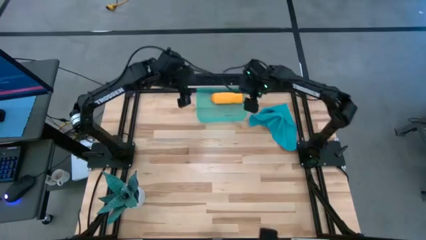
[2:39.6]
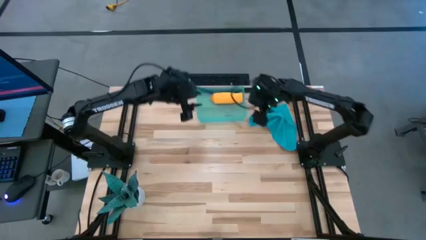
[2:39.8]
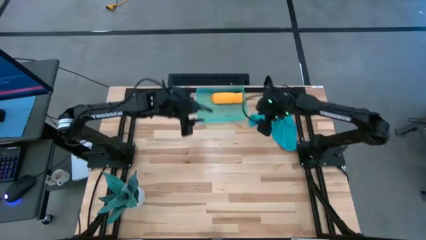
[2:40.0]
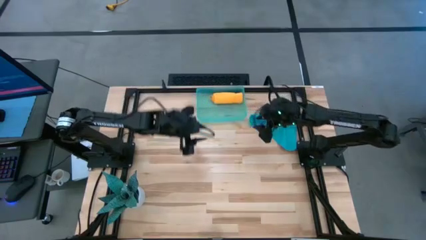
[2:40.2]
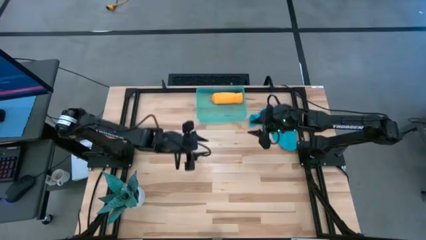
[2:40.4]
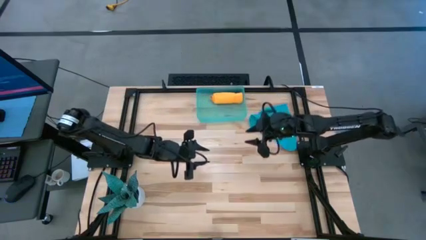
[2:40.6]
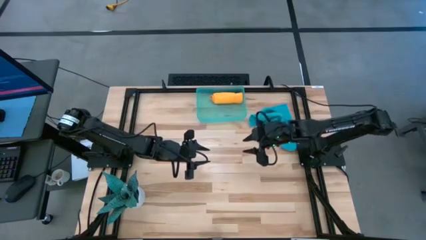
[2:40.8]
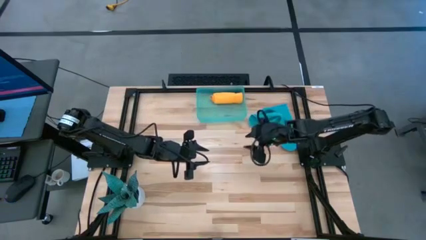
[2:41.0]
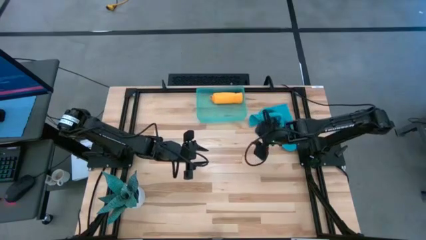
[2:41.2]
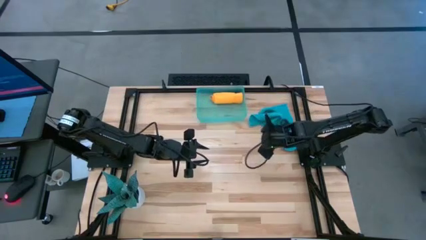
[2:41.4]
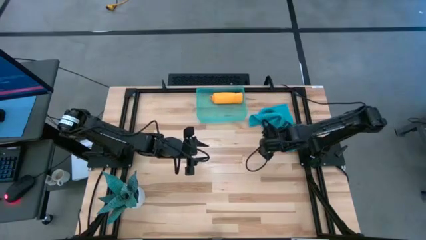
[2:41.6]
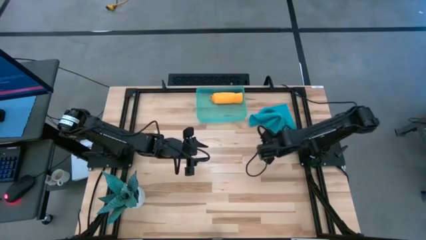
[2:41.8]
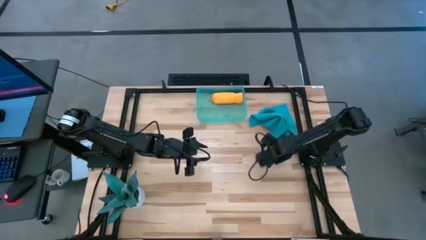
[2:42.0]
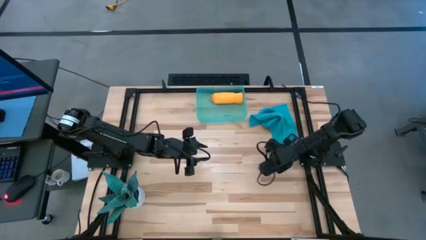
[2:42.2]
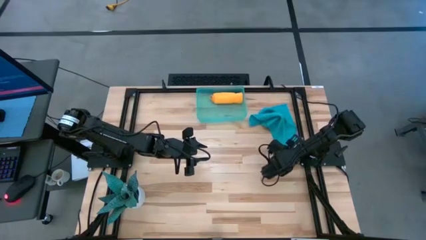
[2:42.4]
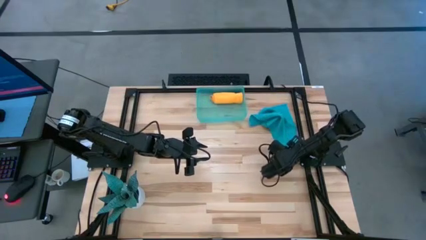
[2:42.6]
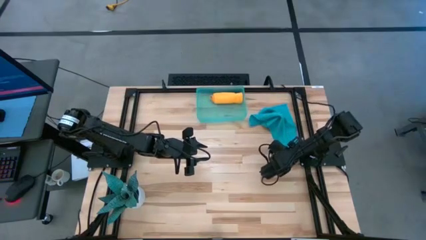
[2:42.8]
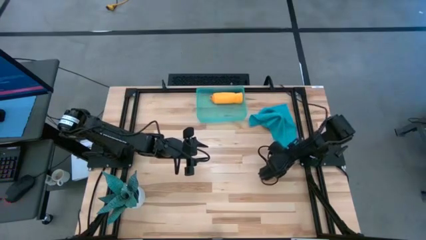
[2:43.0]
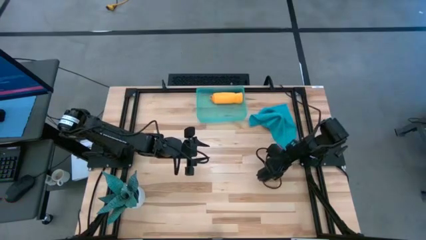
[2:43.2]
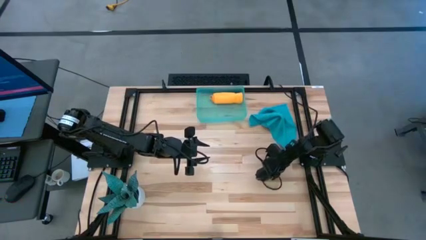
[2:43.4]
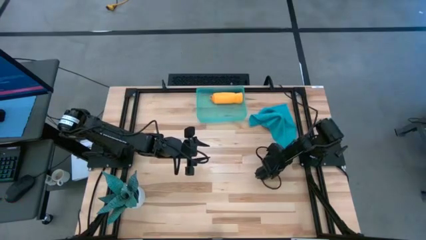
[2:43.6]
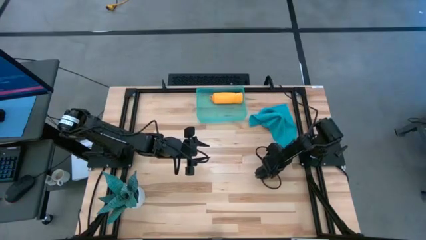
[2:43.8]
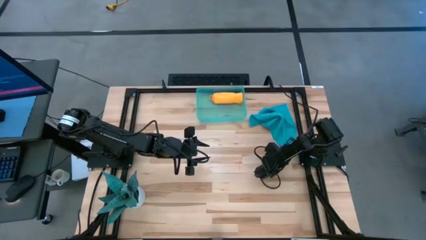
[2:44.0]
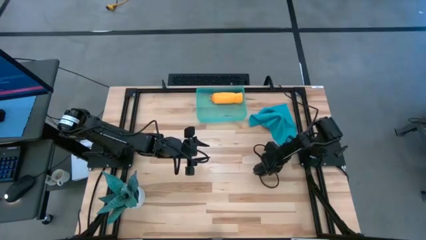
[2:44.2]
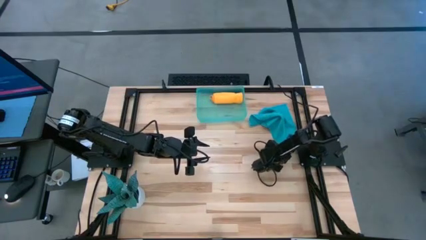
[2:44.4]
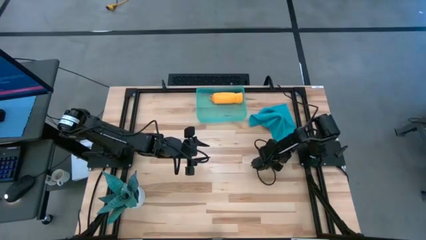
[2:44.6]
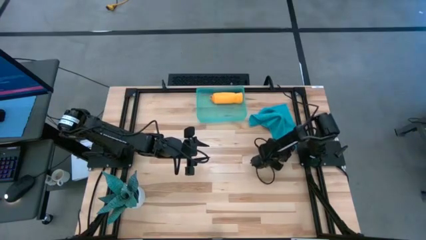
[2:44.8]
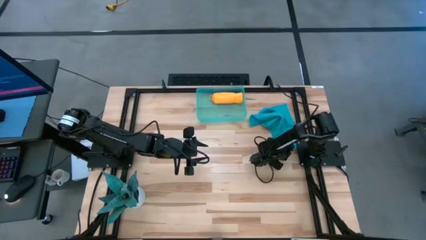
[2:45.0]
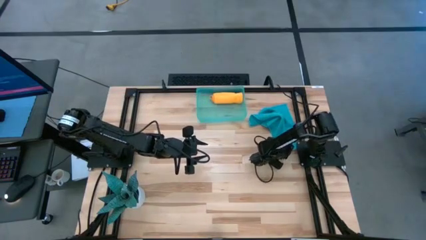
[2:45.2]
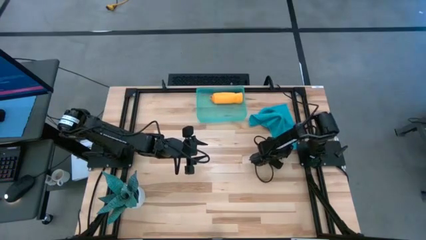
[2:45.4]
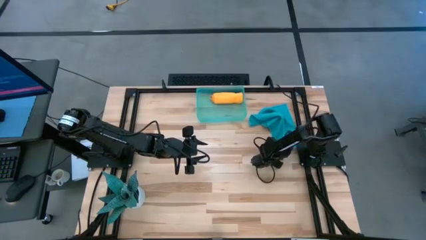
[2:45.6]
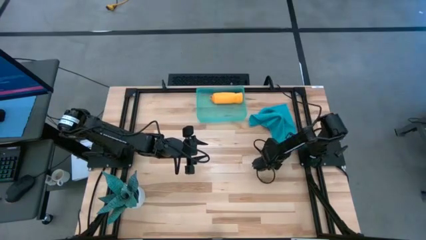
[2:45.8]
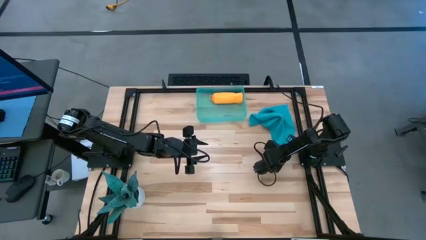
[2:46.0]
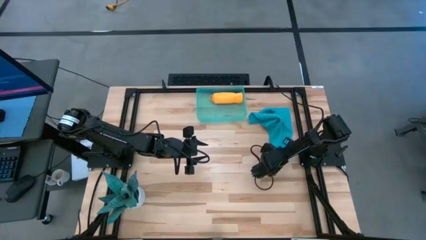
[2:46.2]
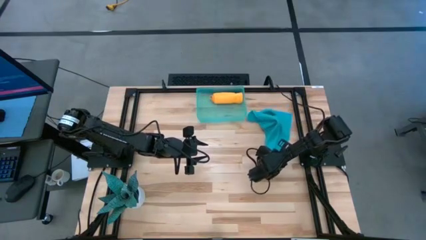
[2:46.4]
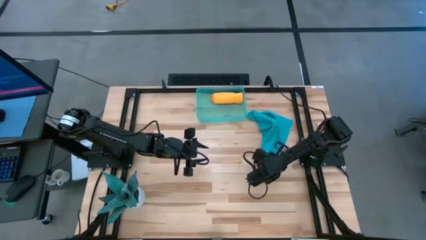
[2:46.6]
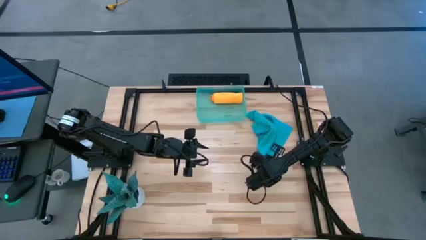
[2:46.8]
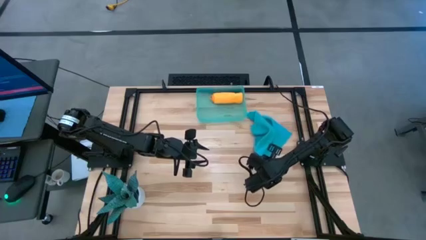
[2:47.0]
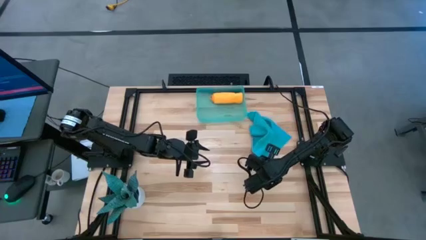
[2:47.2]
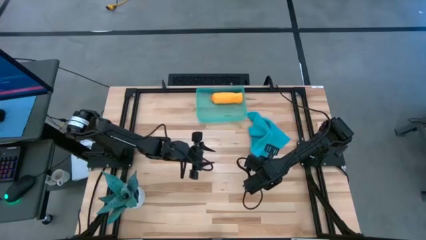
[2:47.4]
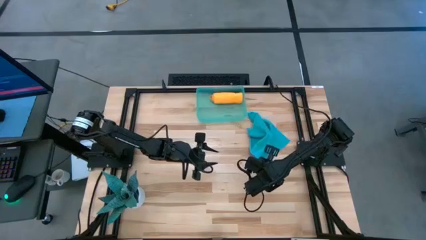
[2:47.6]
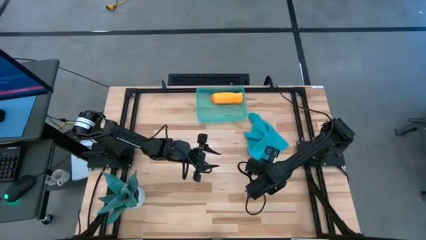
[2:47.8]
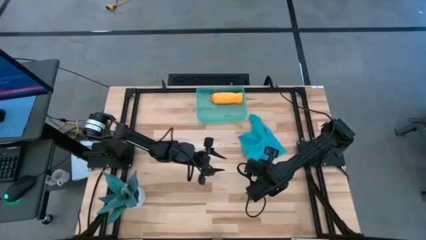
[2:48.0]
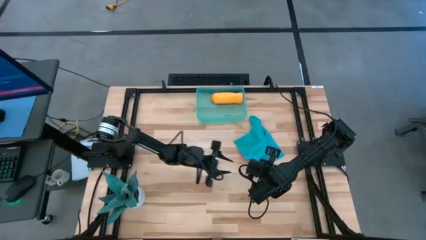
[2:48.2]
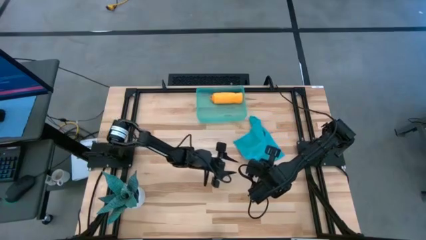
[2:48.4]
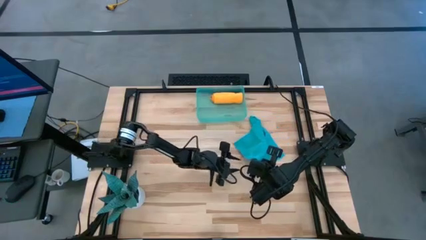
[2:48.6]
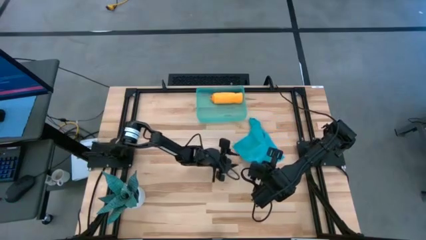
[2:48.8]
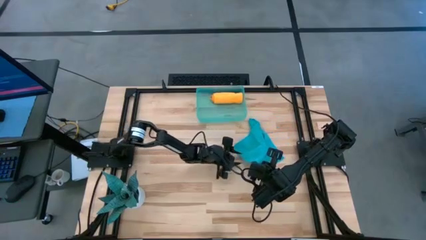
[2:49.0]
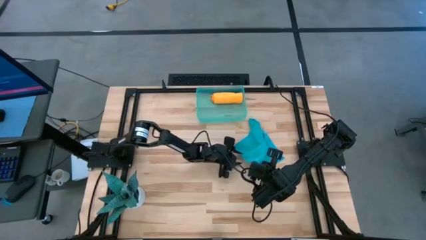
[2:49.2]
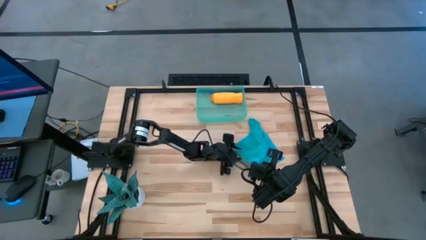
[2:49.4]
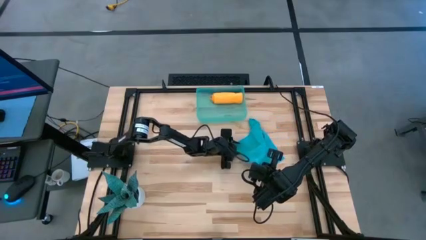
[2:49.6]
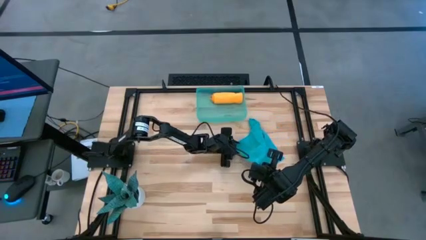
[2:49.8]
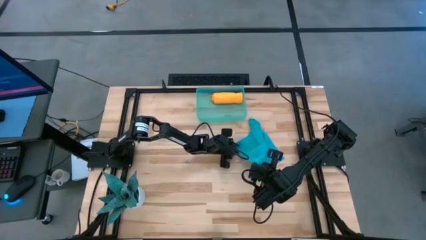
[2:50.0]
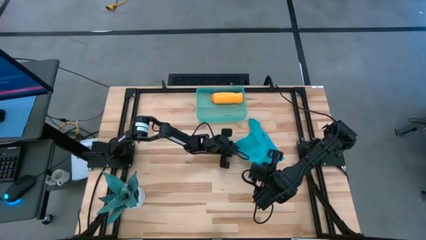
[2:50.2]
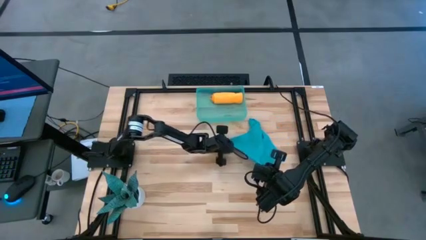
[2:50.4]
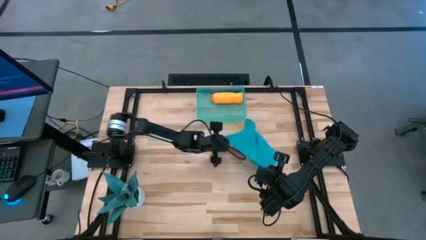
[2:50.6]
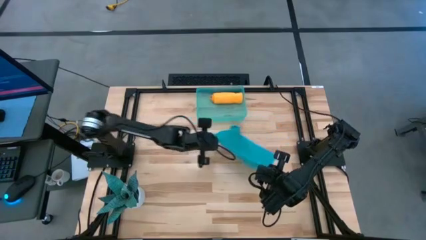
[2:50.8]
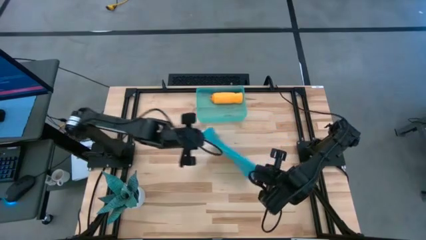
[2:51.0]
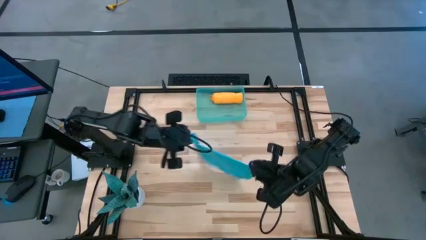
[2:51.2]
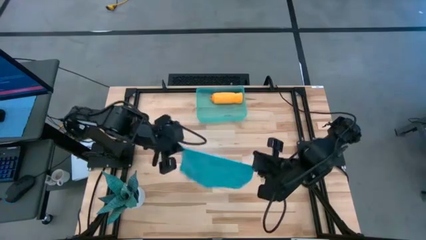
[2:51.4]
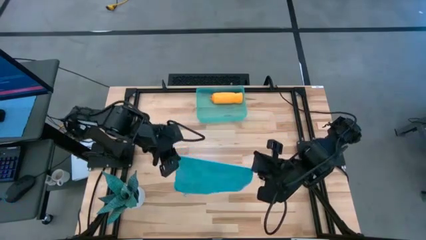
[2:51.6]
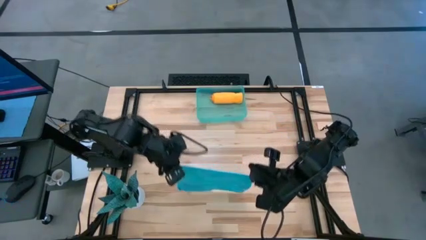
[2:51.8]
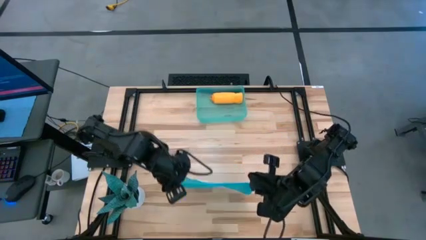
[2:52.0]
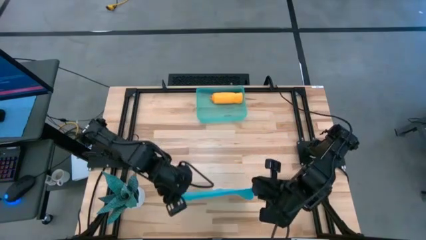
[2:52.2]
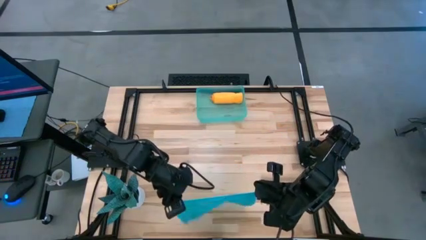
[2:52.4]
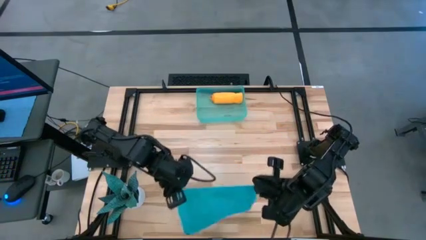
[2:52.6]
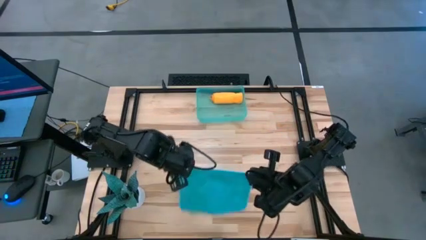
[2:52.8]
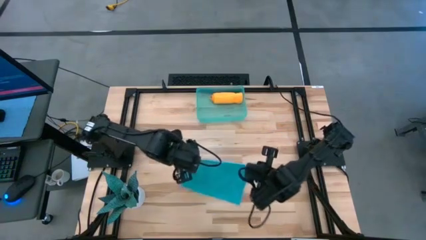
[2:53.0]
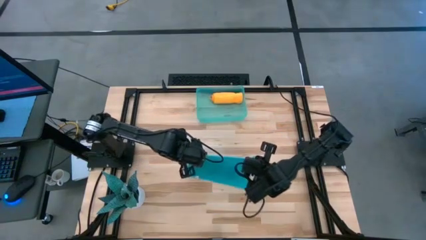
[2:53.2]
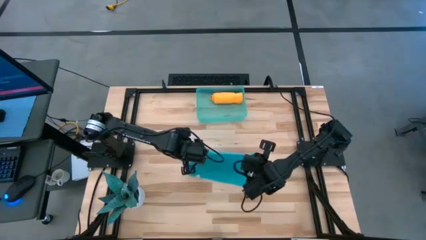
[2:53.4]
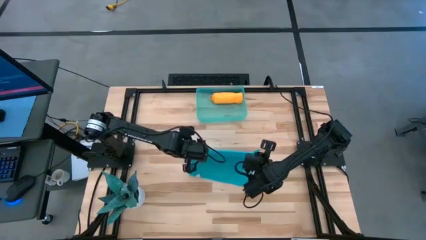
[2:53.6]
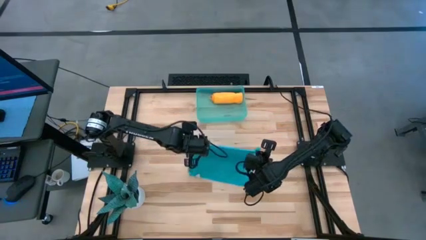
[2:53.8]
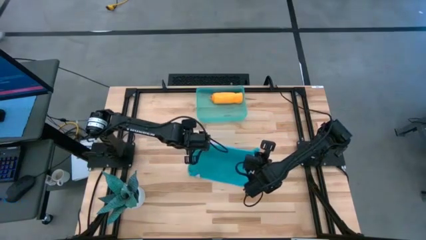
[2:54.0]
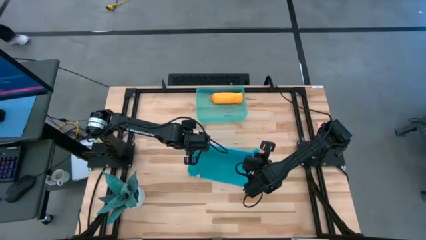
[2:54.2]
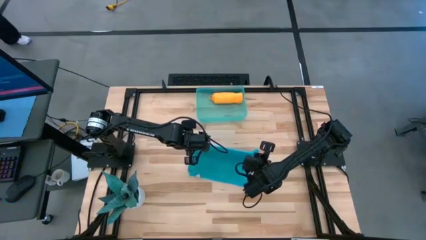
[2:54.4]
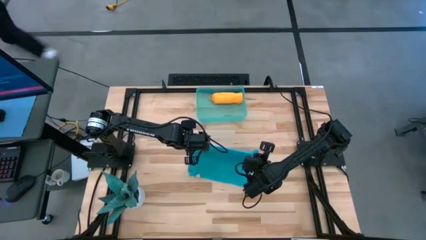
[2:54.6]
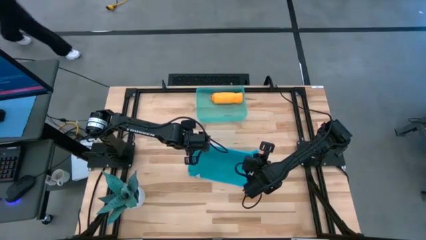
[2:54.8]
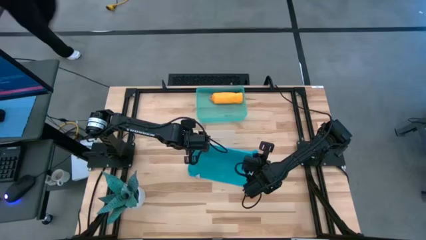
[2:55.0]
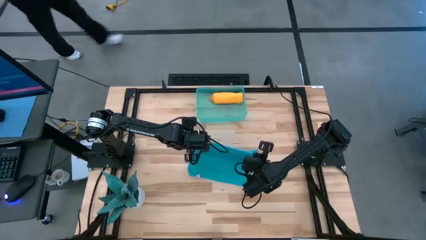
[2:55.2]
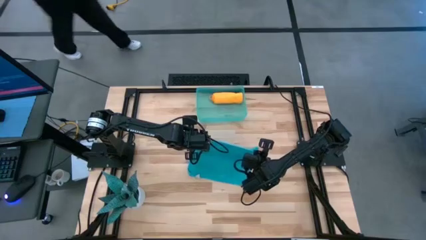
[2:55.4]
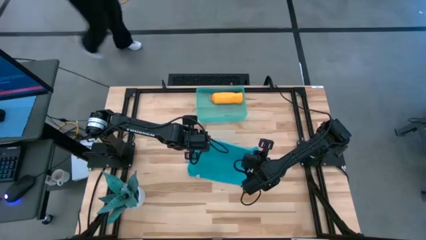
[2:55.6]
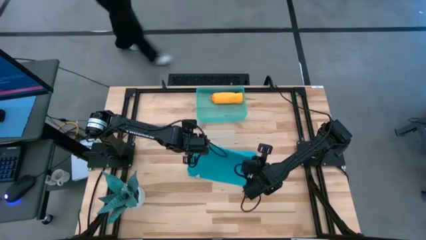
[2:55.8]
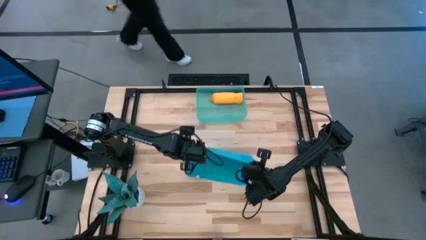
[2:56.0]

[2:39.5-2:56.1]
Task: Roll microfiber towels into tight, uniform cylinder then place into a basket
Roll the blue microfiber cloth on the table
